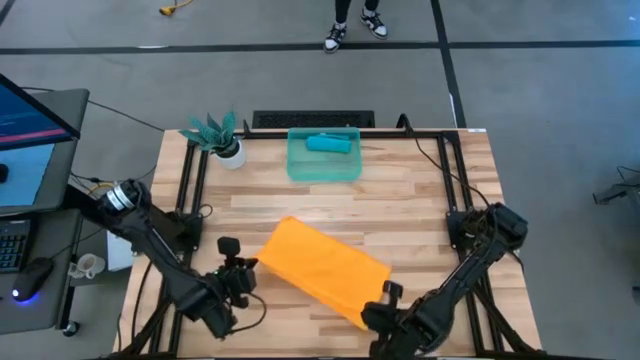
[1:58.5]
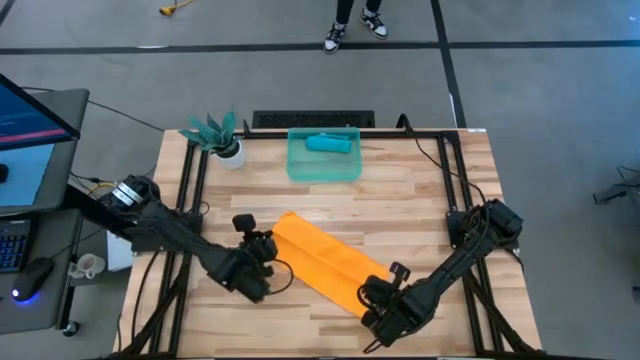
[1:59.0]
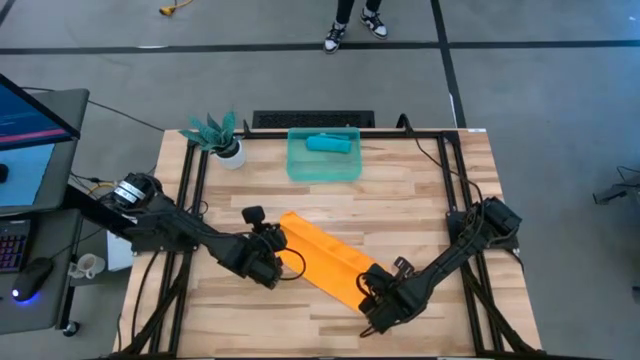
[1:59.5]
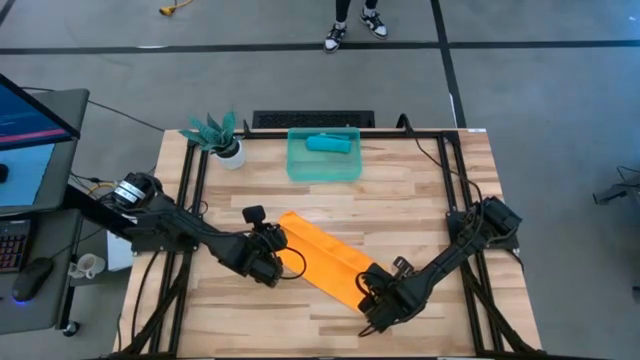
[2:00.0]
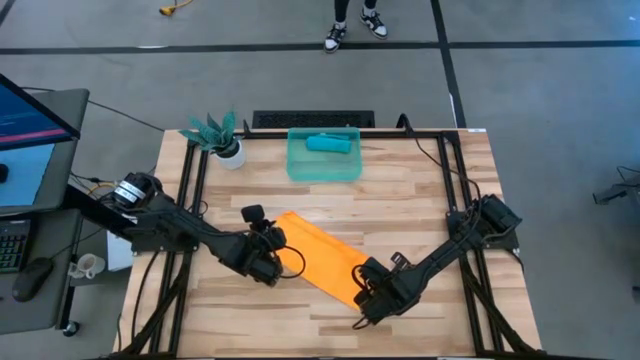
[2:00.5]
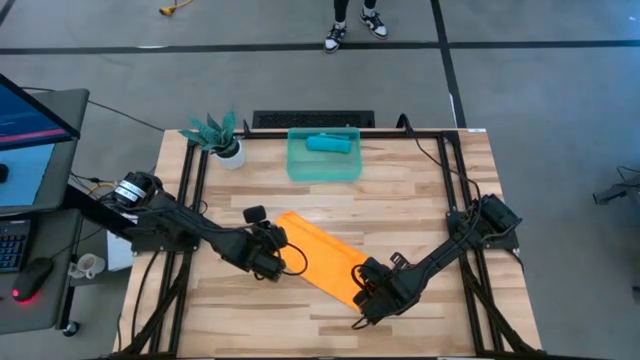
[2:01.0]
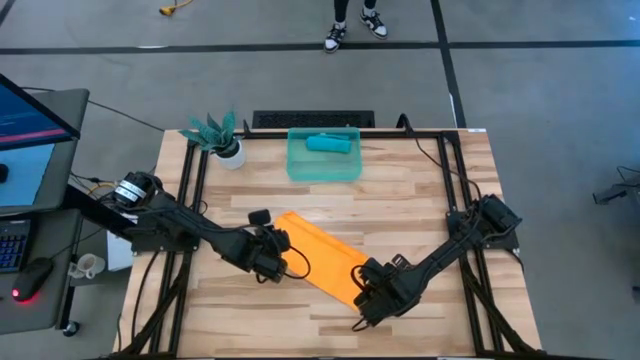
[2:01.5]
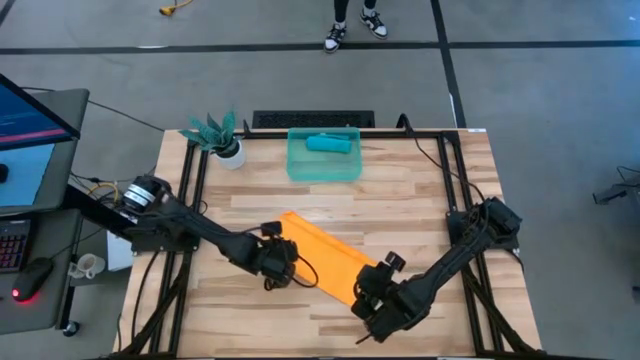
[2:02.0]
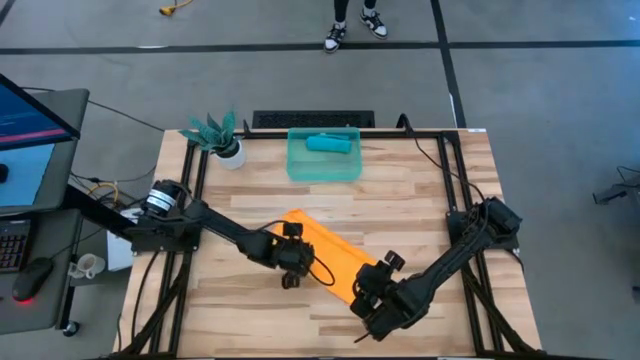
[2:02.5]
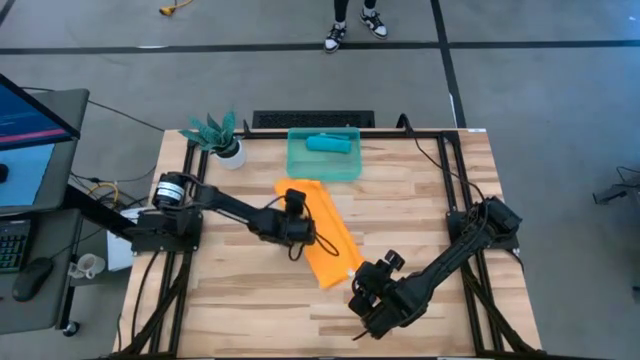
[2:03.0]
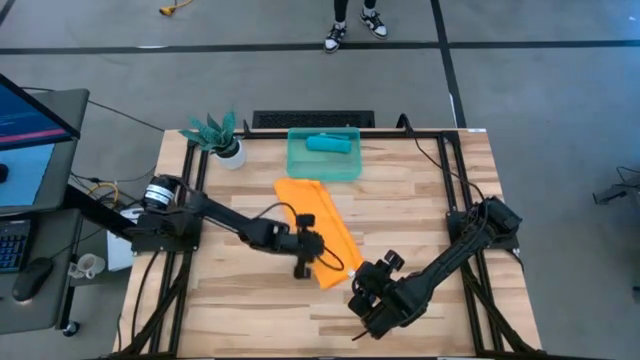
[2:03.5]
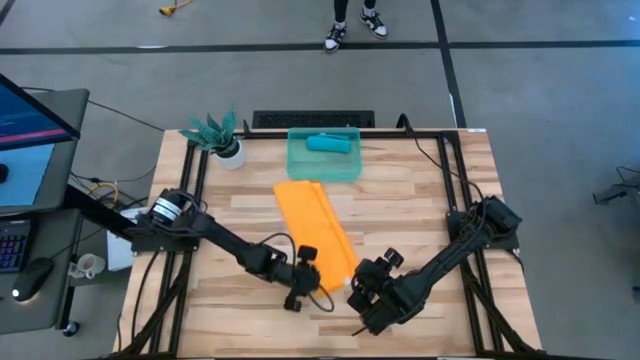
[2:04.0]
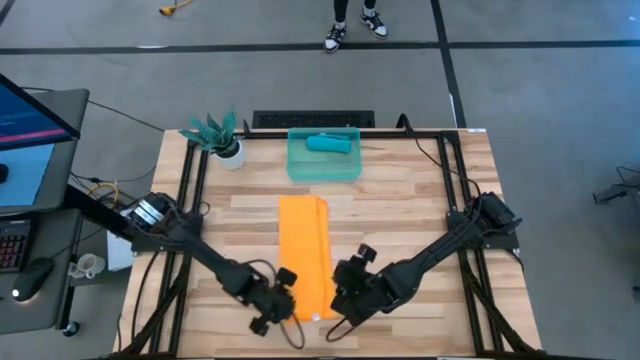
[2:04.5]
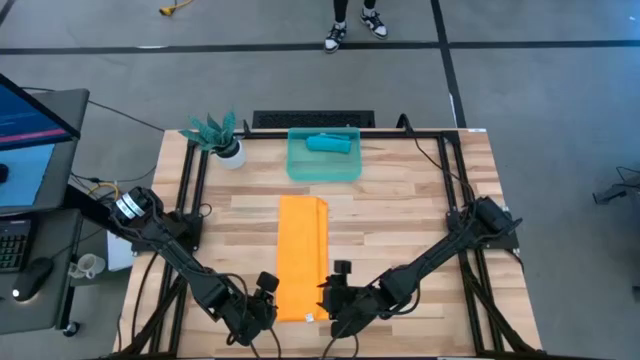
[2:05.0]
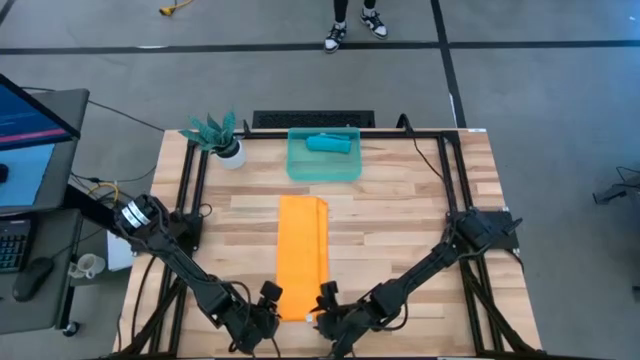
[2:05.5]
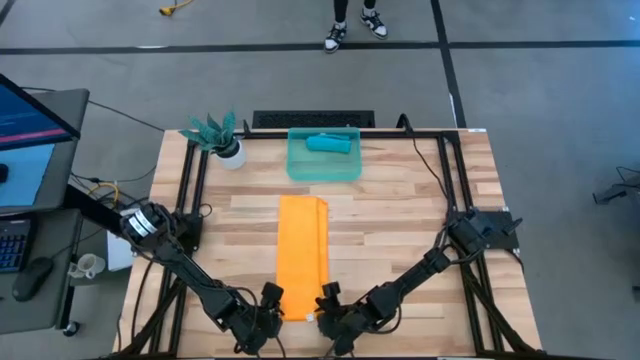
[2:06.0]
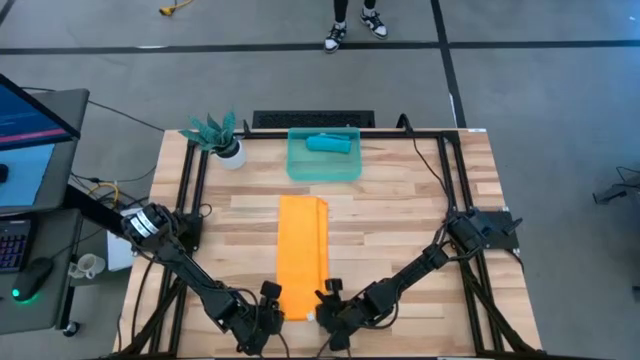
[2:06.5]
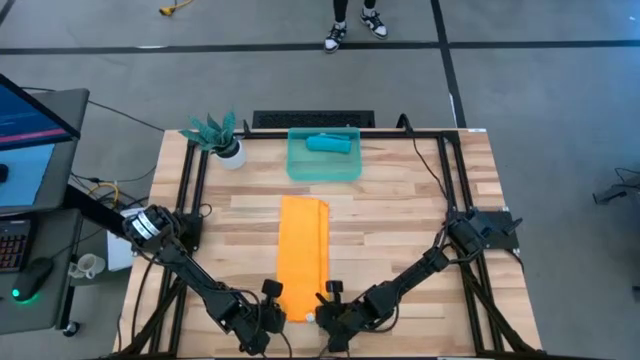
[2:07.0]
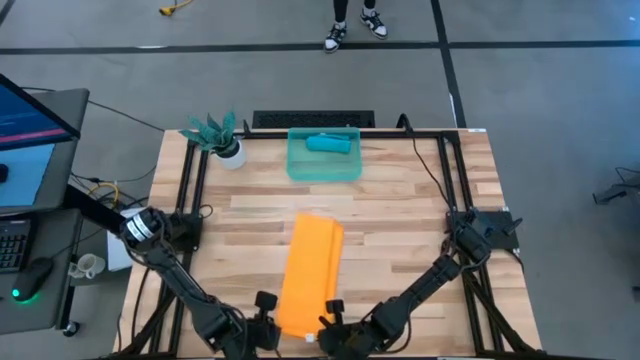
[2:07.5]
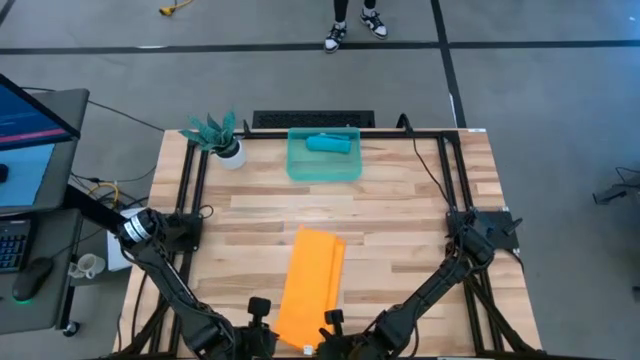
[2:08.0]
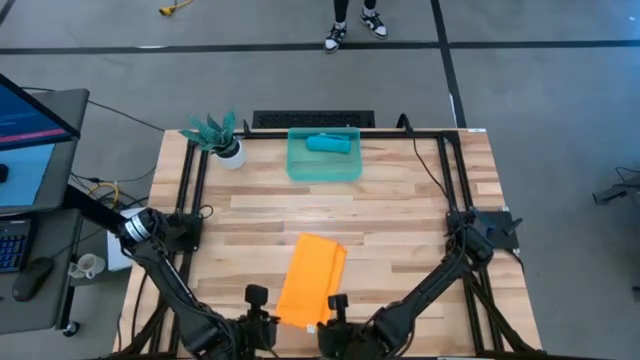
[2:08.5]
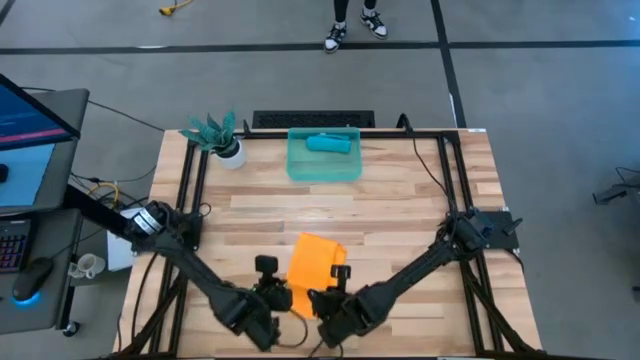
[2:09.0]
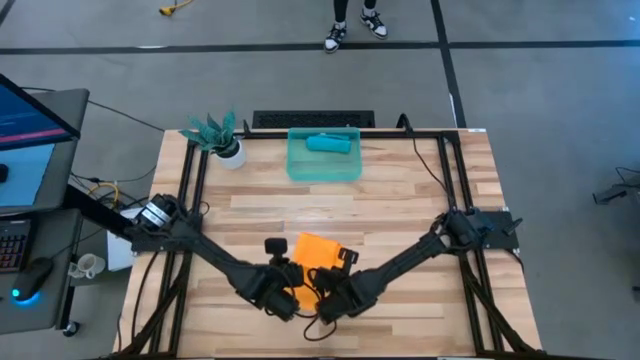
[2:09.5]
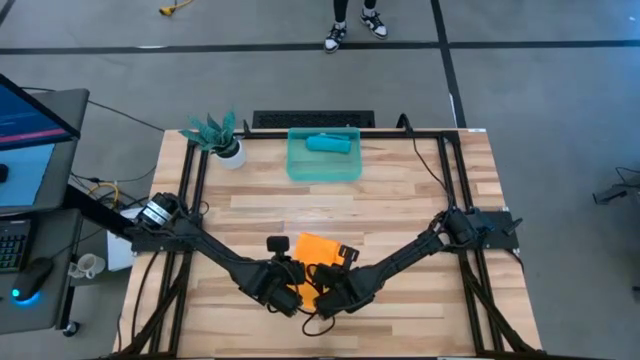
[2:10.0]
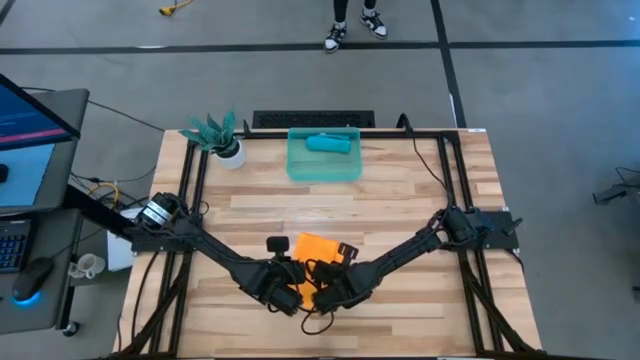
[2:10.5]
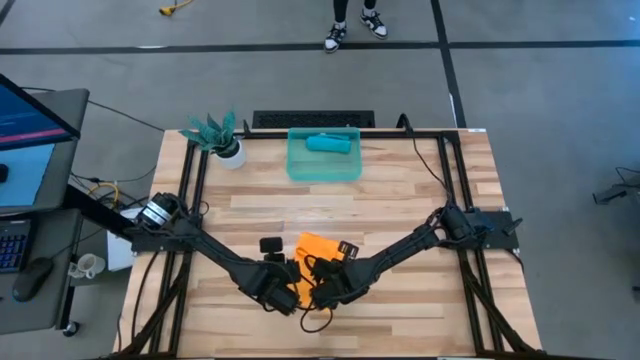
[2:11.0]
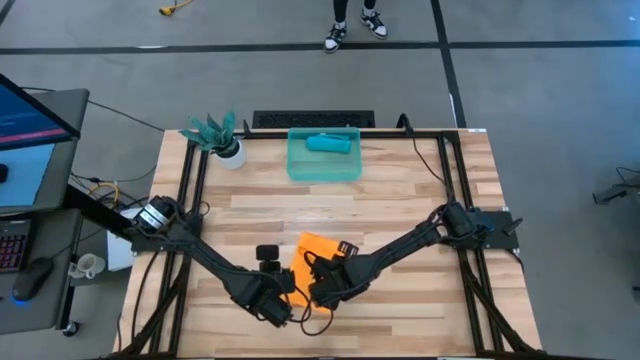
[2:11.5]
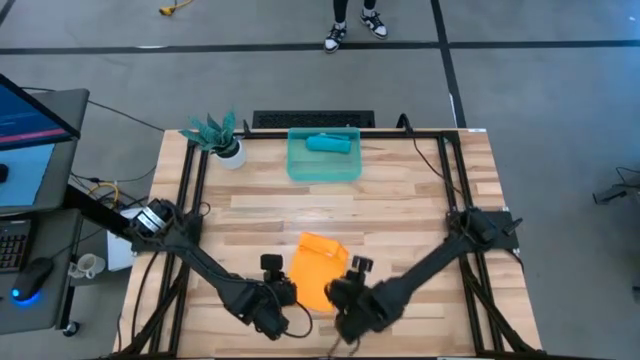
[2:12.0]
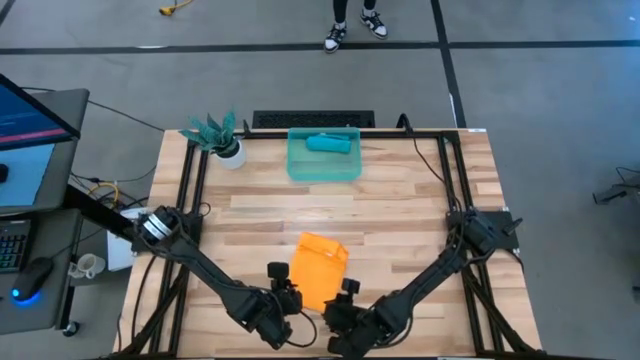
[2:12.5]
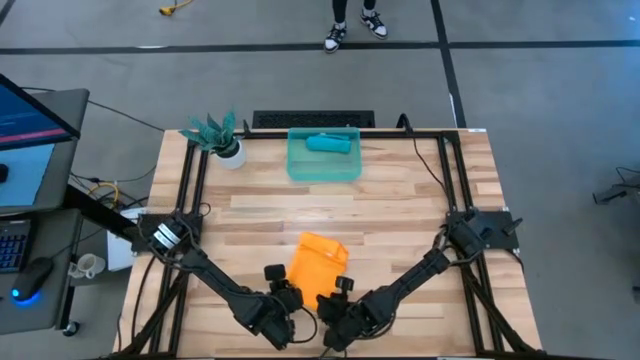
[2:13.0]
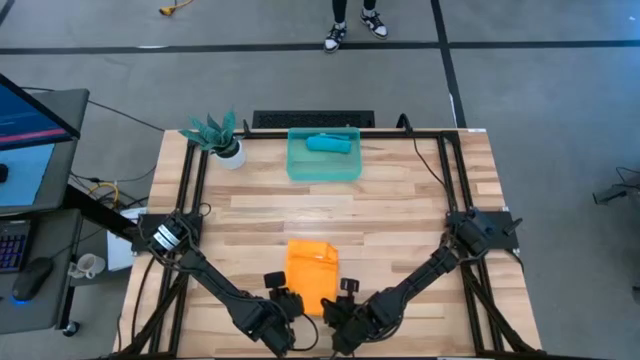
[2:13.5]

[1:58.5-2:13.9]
Task: Roll microfiber towels into tight, uniform cylinder then place into a basket
Fold the yellow microfiber cloth

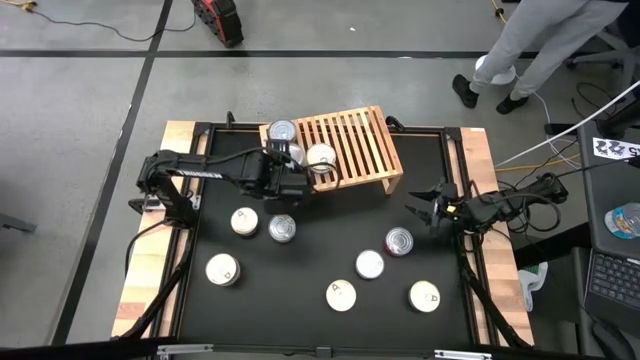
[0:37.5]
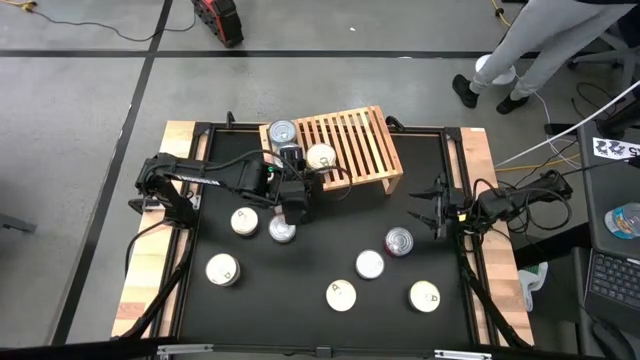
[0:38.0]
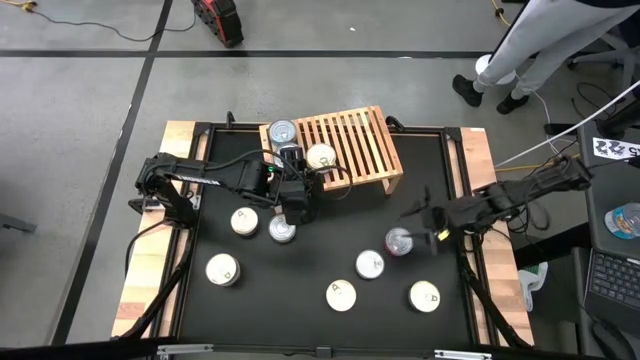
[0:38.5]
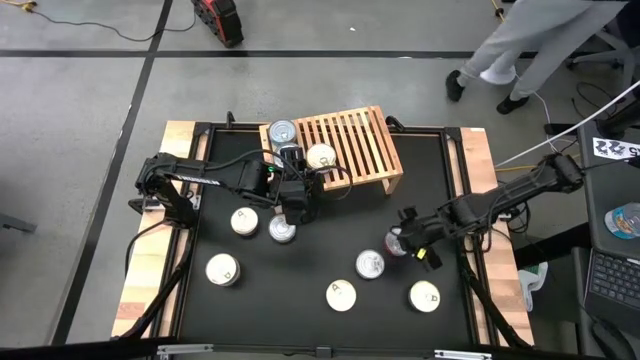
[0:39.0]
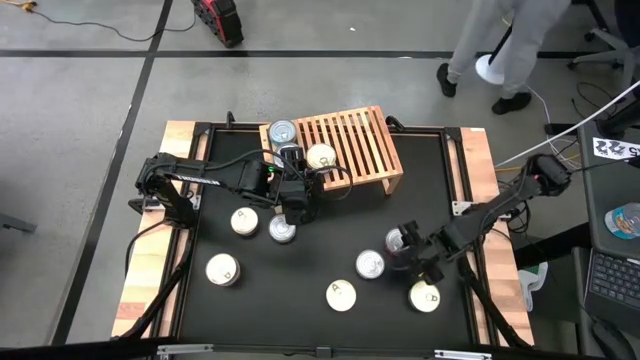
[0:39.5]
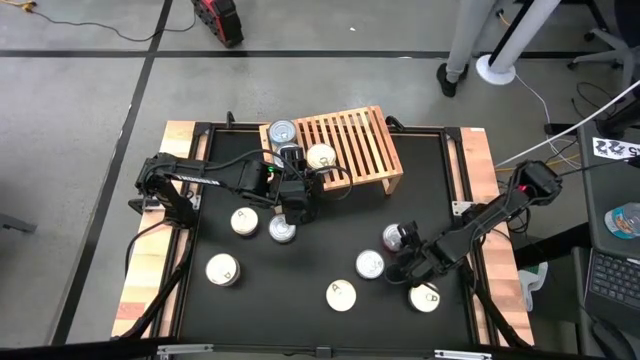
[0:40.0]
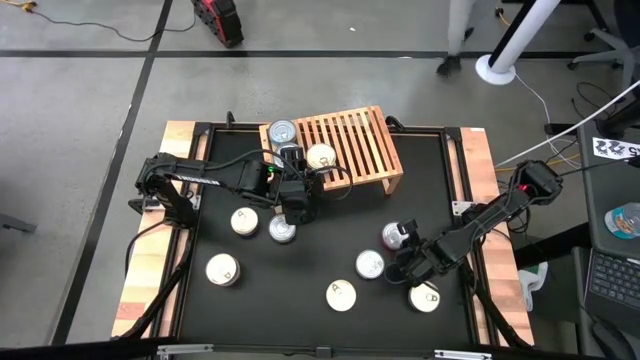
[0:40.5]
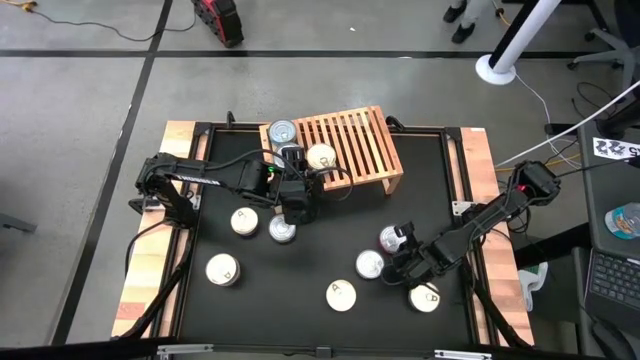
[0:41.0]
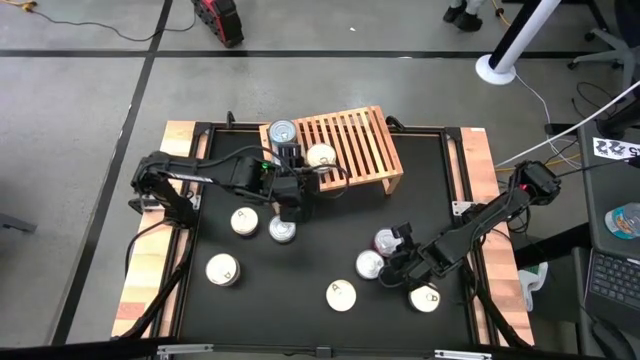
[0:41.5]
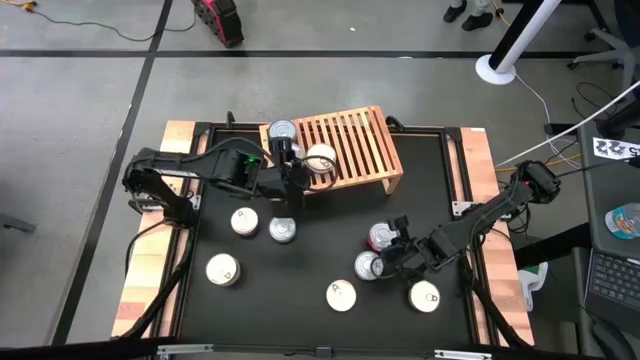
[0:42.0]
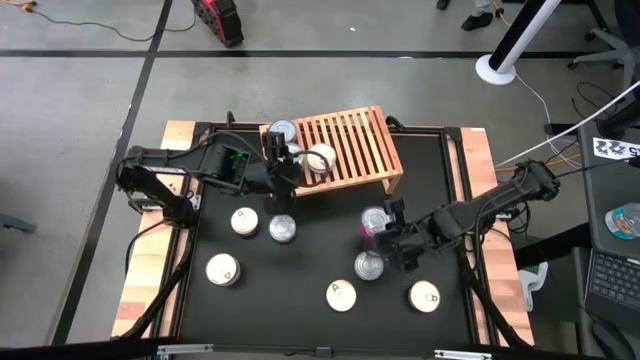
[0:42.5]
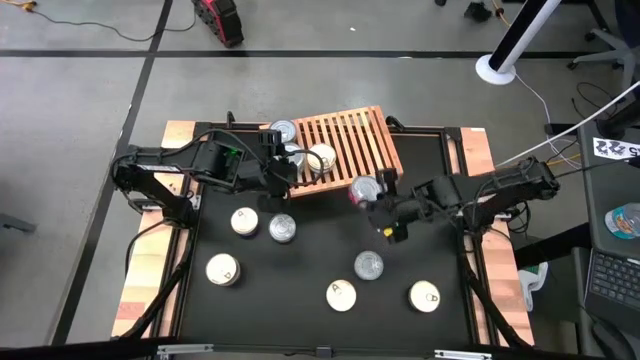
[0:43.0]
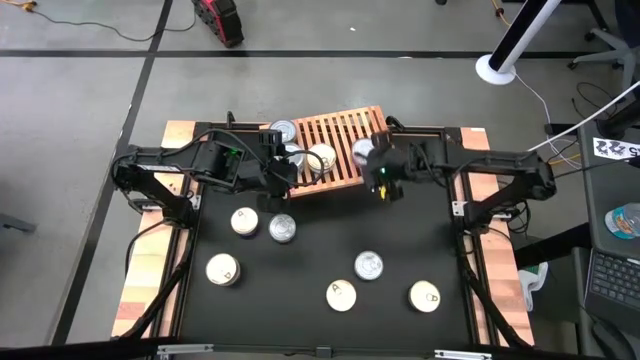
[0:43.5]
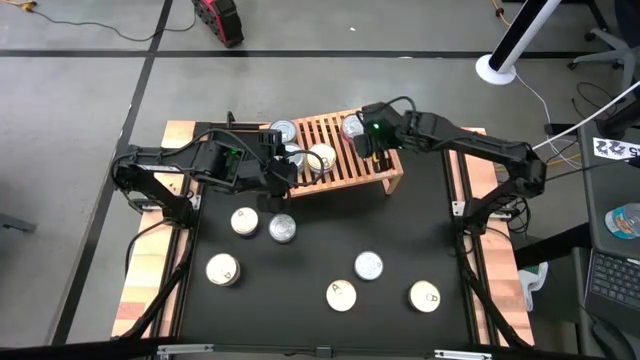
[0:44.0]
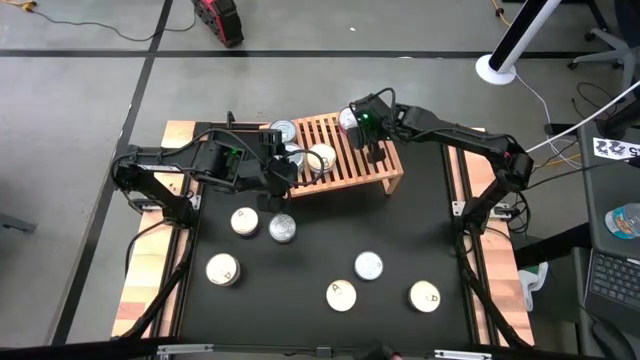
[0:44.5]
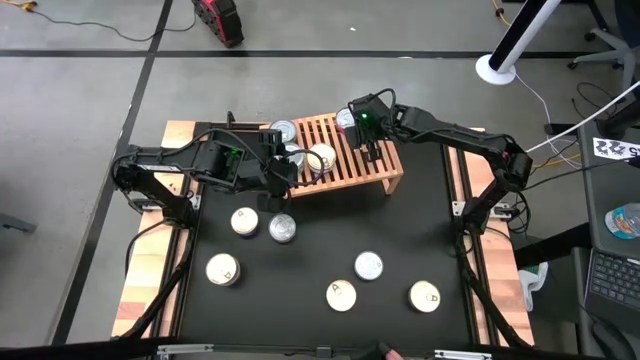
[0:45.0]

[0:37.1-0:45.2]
Task: Stack canned seafood by type on shelf
Put the red tuna can on the shelf
